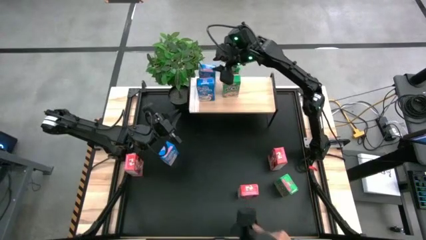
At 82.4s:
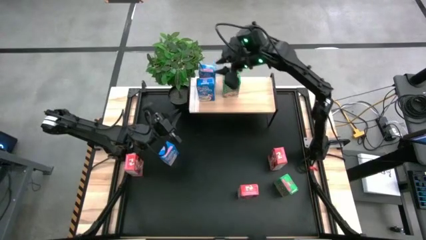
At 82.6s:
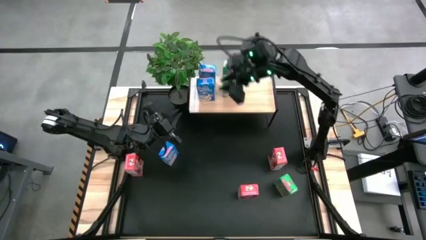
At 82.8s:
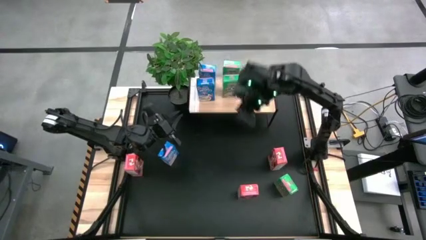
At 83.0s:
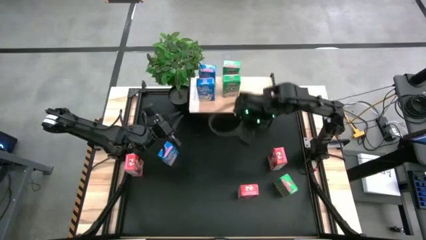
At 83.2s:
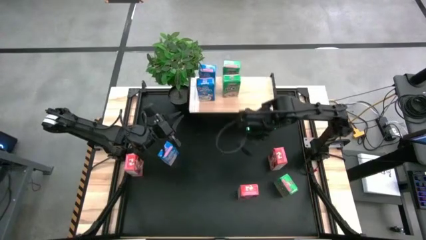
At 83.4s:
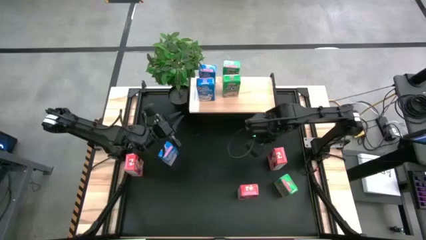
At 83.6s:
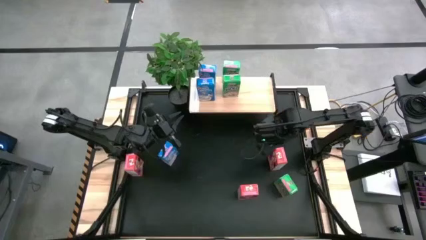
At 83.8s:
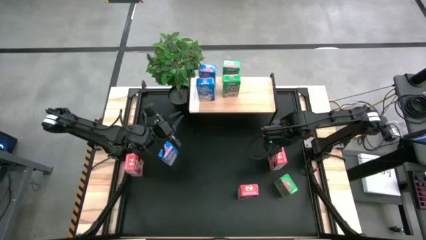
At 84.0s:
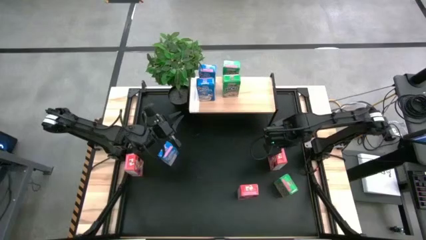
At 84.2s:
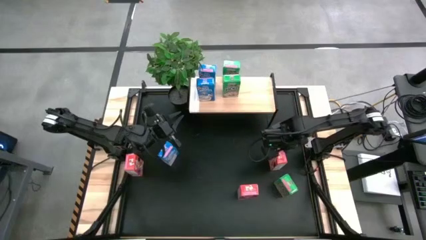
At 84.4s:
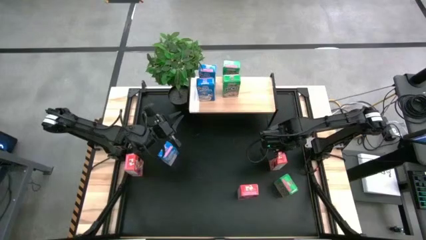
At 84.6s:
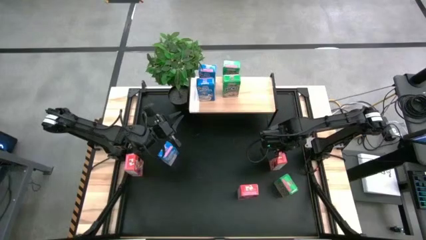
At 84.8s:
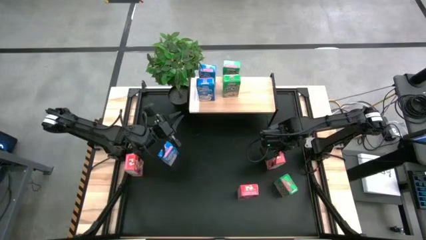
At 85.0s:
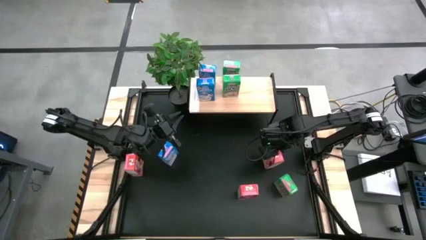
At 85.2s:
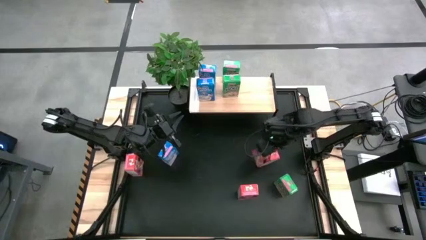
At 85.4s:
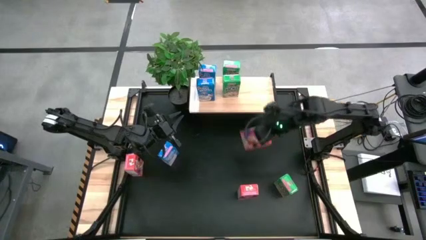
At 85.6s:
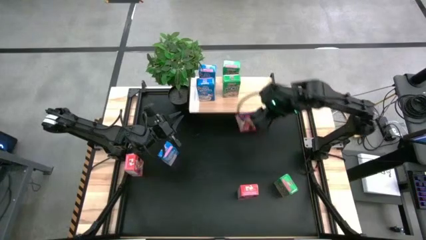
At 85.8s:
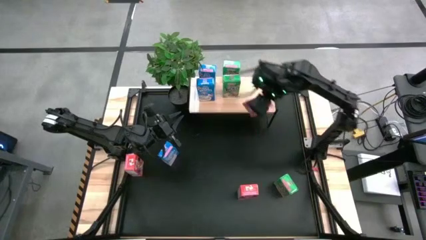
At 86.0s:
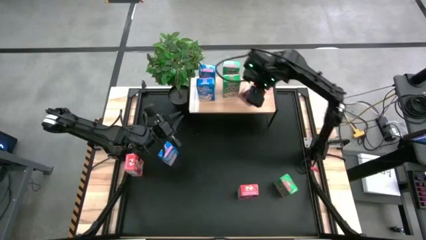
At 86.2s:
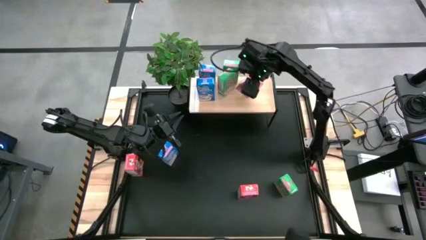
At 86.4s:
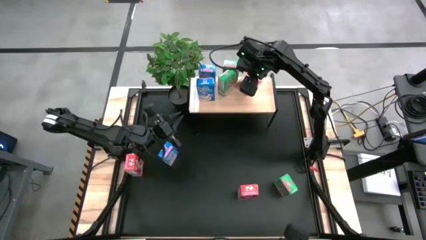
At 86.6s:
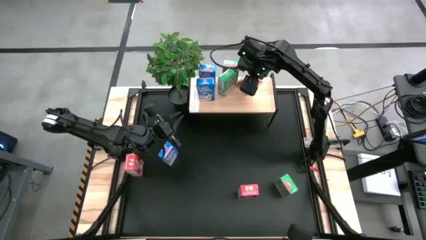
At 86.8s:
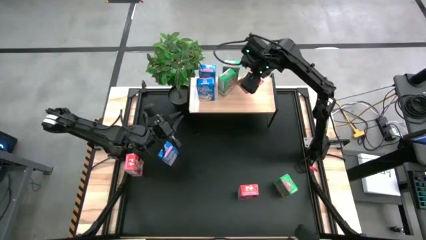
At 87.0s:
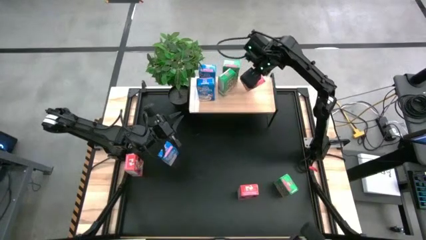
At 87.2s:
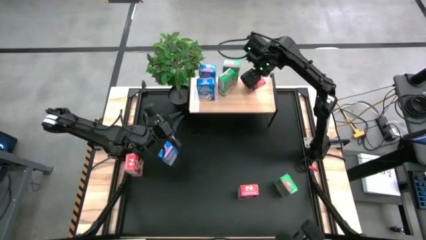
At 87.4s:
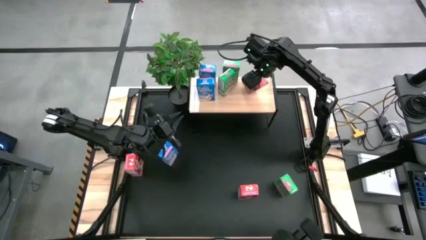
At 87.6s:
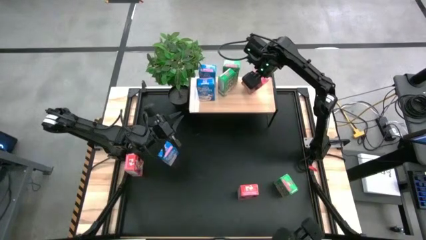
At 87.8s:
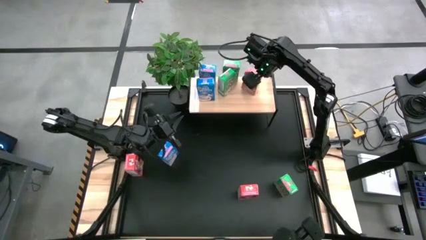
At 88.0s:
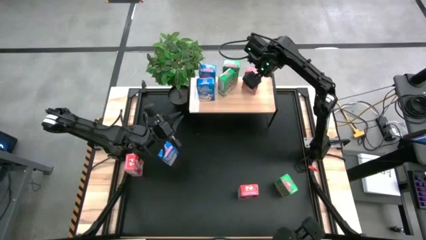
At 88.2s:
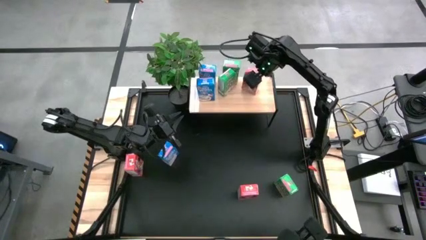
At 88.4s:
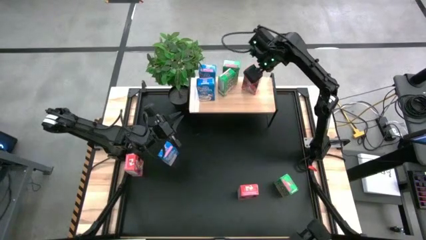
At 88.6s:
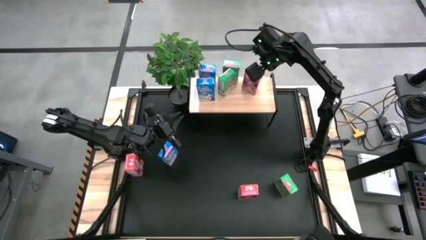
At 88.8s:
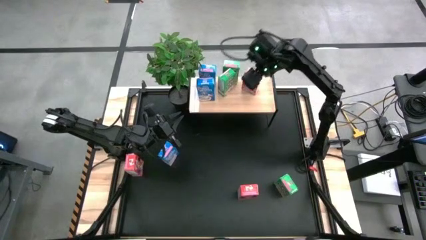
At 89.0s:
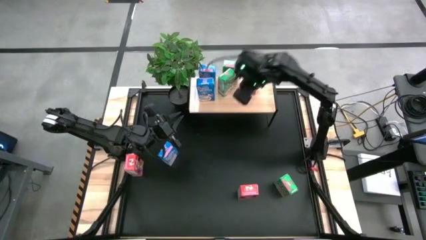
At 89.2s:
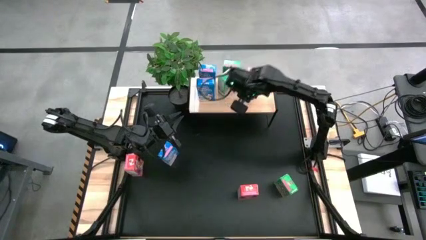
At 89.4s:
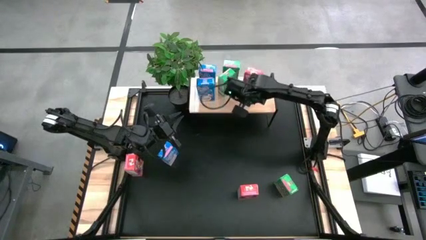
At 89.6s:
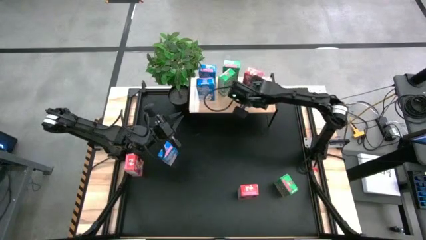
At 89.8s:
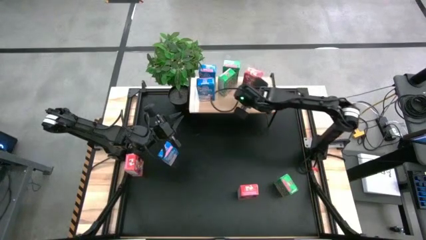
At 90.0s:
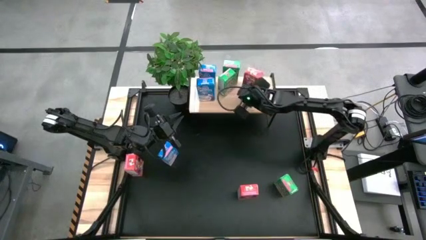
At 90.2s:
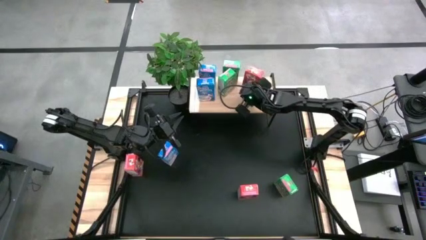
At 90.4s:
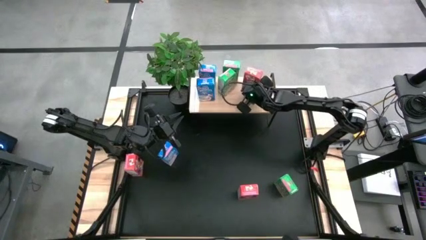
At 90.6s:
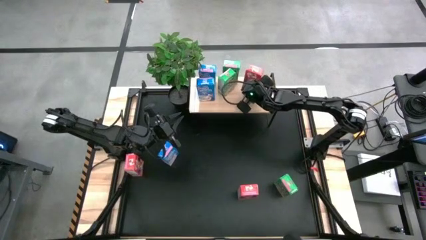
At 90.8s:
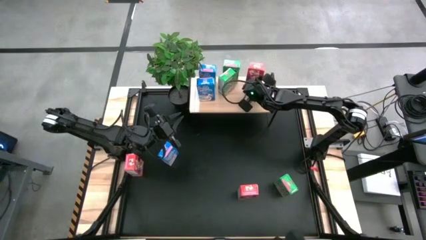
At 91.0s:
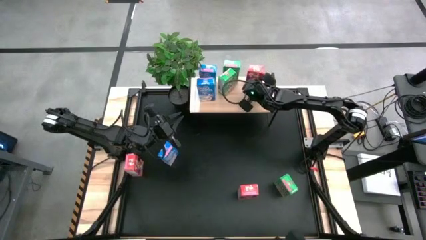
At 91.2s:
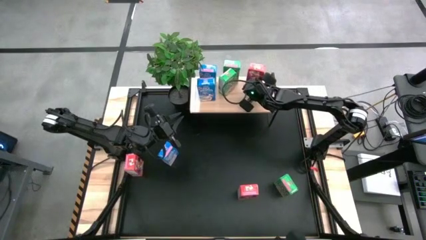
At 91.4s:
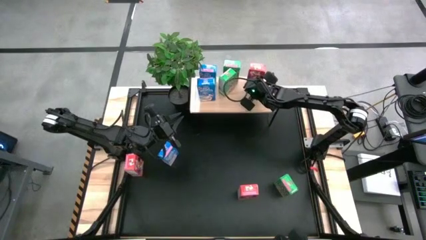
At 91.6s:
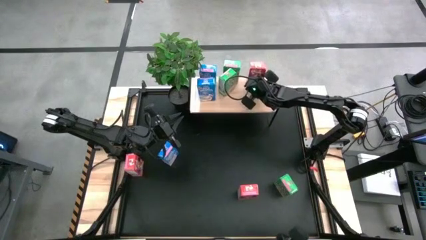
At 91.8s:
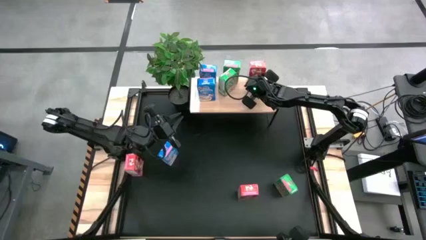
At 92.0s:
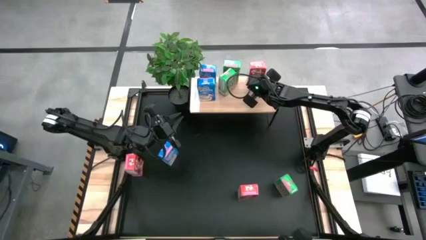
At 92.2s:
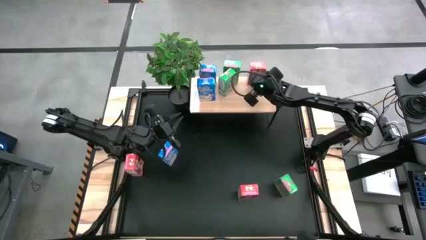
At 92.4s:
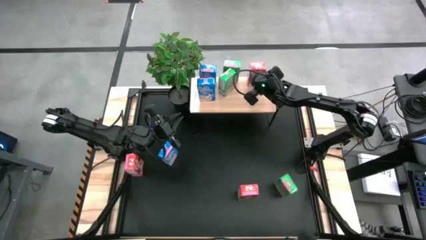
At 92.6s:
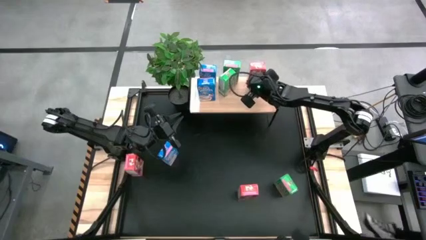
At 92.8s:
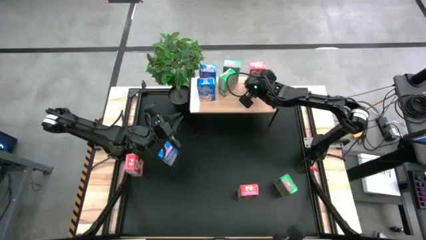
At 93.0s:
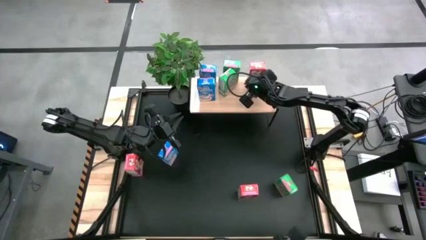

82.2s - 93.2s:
Task: Stack cereal on shelf
Put the top right red cereal box on the shelf, aligned with the other red cereal box

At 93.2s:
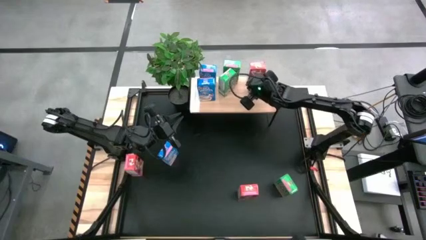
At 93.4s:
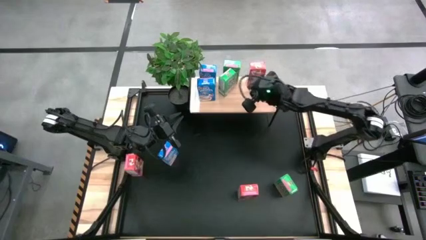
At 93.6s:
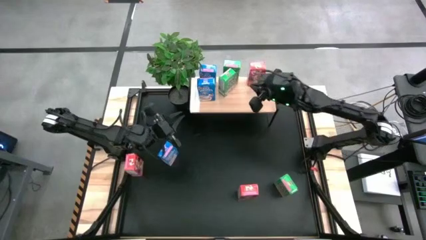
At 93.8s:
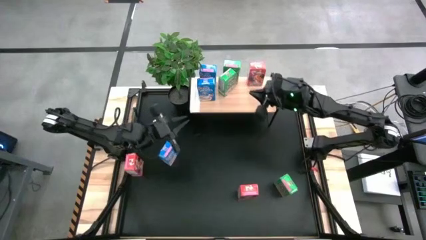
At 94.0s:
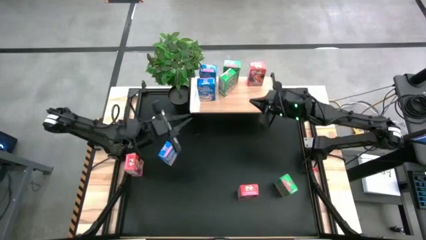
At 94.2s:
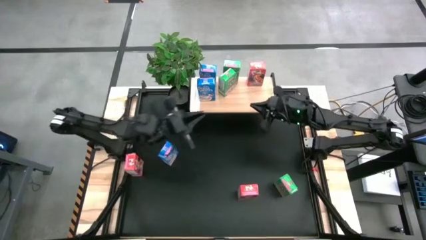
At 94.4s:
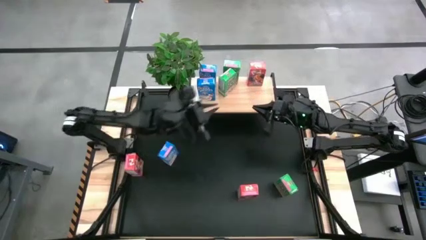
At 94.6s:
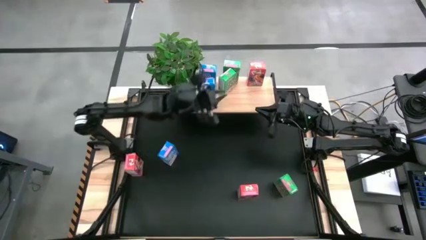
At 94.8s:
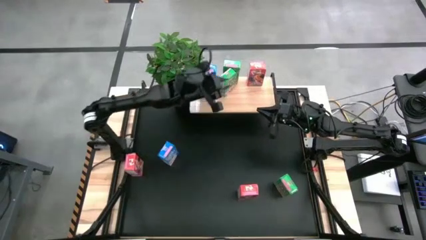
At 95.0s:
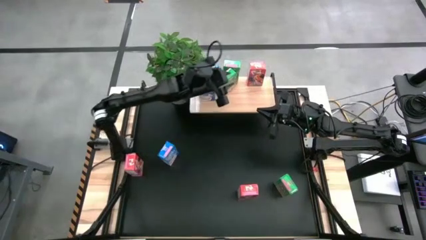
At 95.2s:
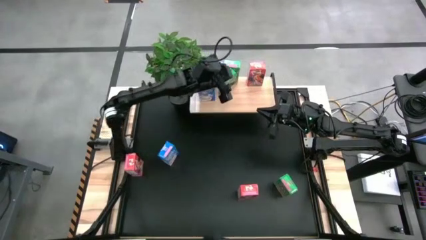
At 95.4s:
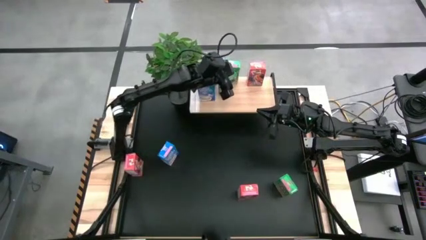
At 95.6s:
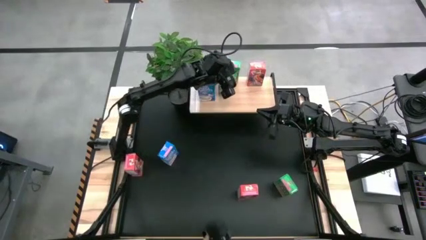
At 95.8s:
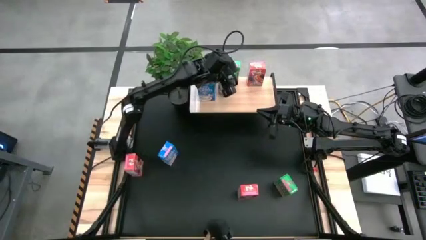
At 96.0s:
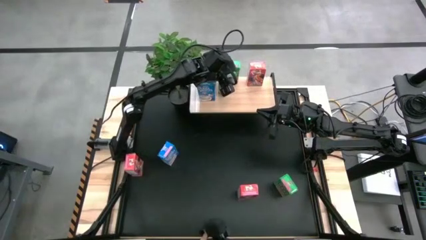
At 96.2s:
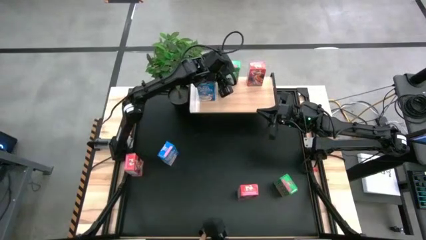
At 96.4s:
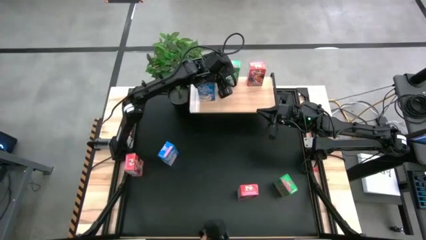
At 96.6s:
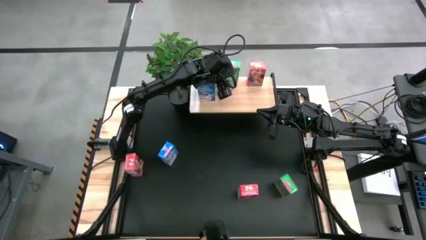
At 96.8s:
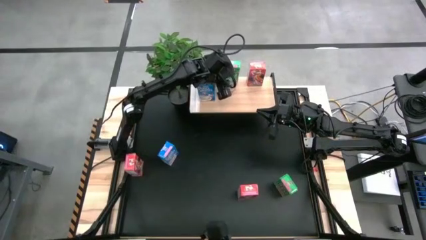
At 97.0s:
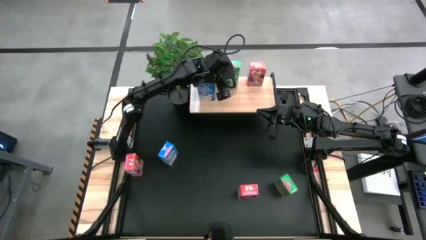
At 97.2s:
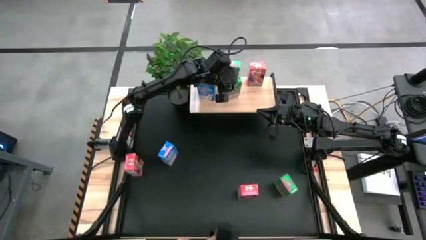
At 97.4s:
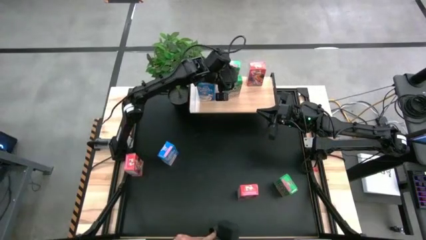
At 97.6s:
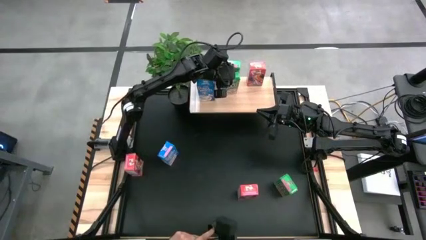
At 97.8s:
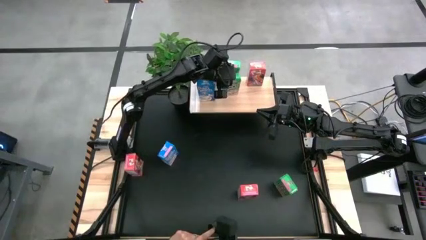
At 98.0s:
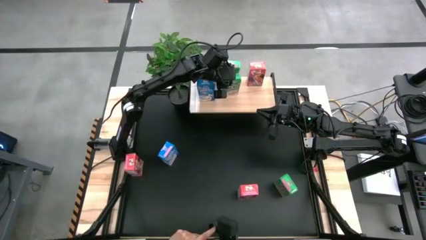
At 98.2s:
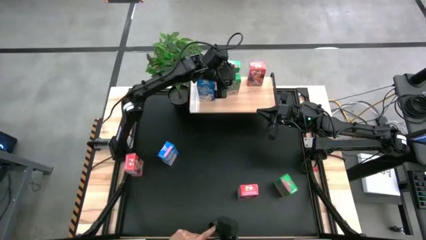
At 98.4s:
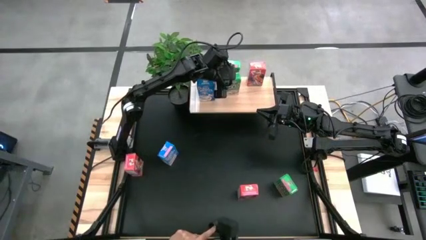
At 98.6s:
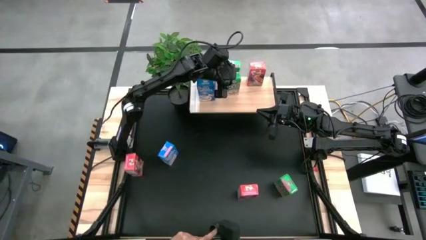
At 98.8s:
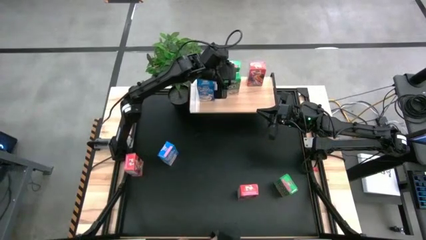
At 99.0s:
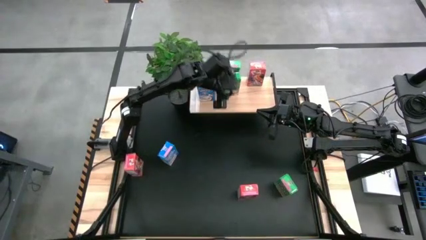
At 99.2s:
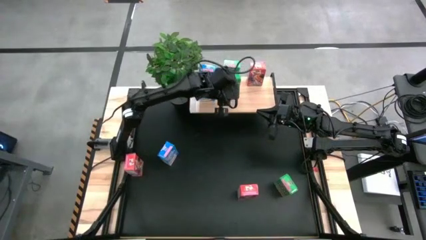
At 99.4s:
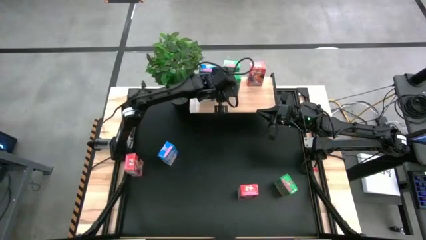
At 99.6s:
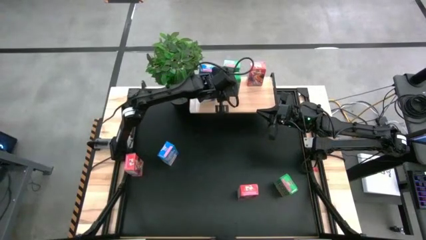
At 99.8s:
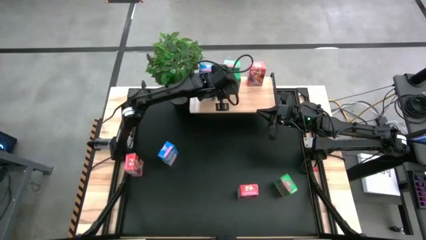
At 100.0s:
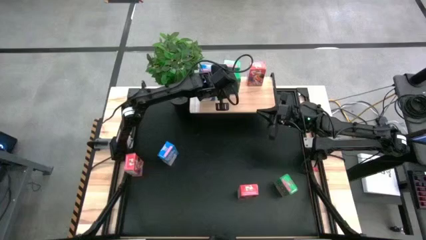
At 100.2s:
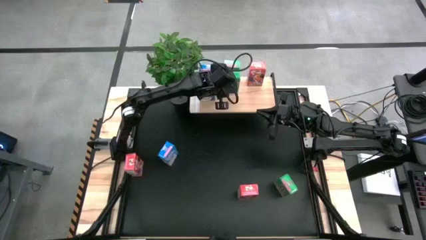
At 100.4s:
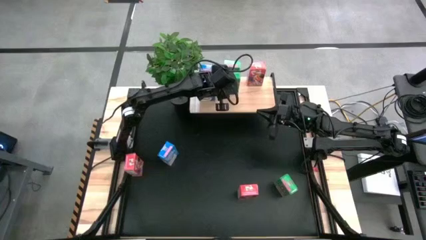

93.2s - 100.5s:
Adjust the green cereal box on the shelf
